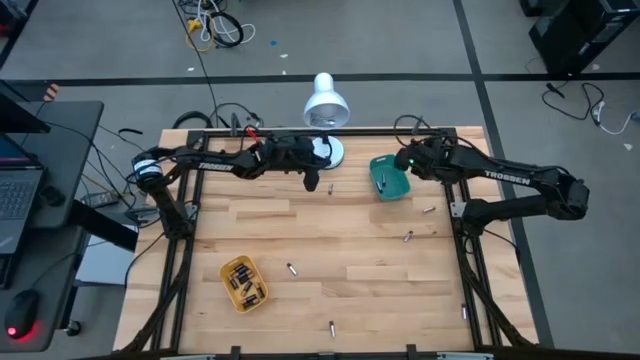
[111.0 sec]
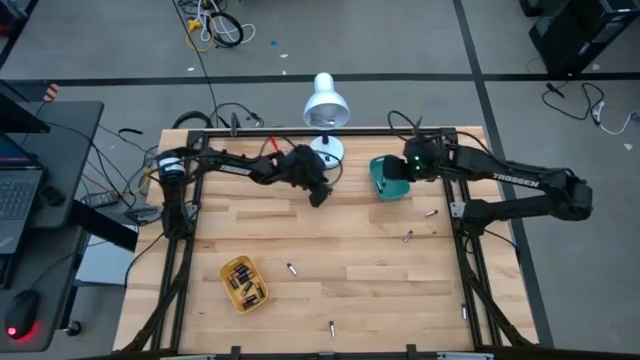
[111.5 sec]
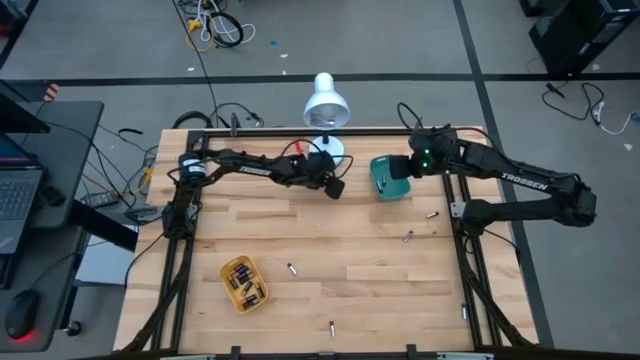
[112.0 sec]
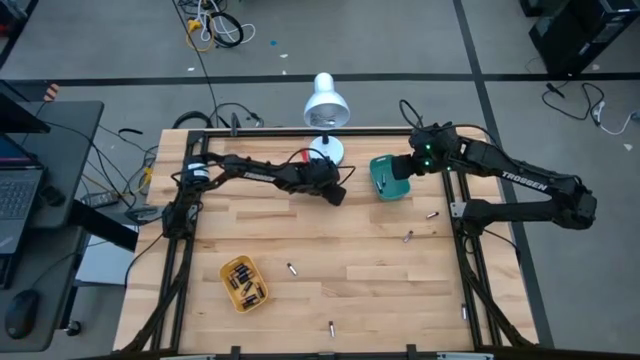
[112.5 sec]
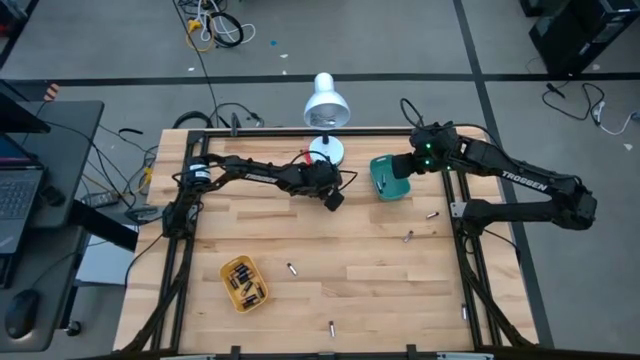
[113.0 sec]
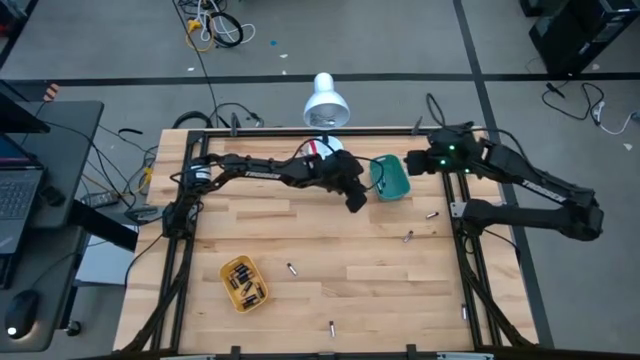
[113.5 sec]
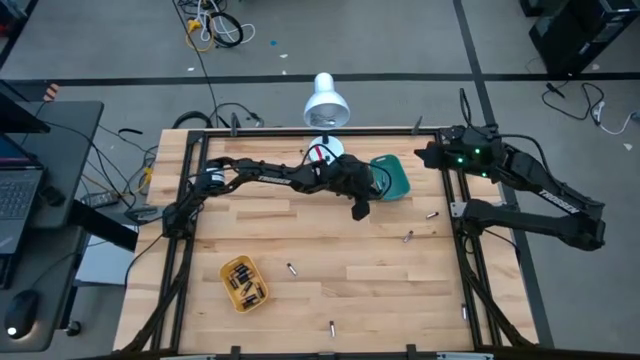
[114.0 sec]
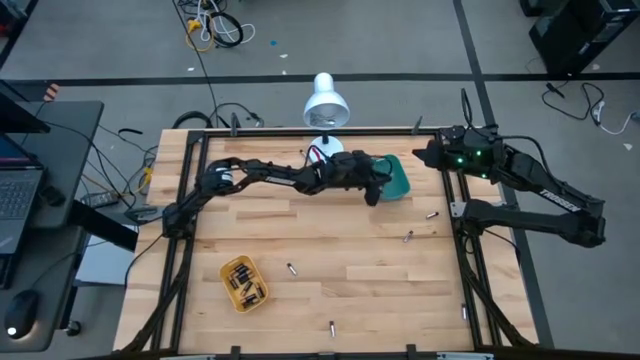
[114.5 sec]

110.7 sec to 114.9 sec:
Task: Sort batteries
Put the silver battery into the green bin

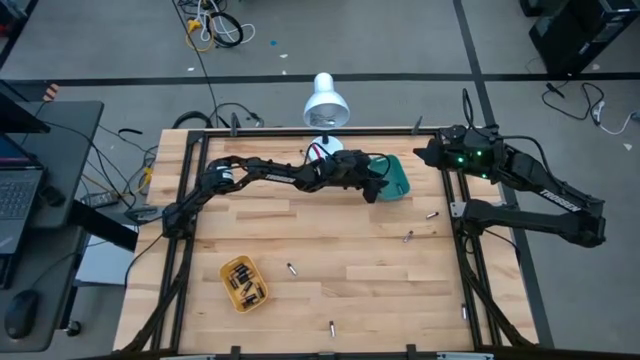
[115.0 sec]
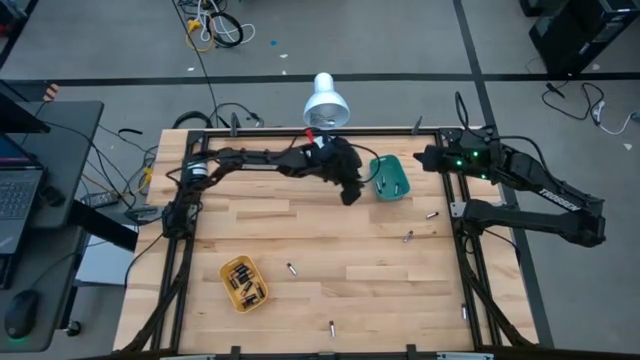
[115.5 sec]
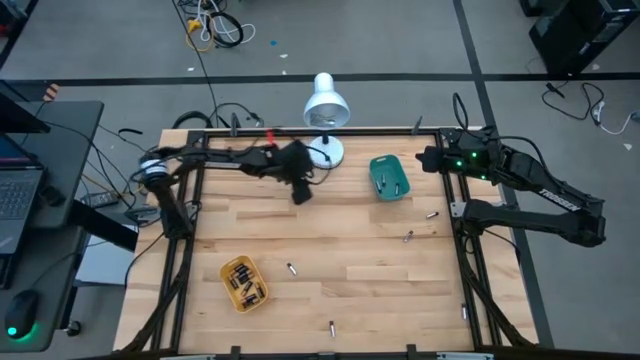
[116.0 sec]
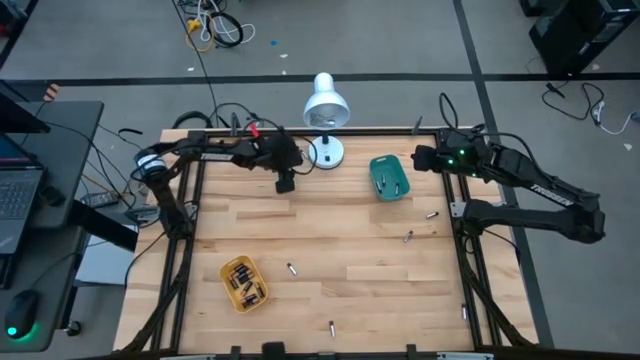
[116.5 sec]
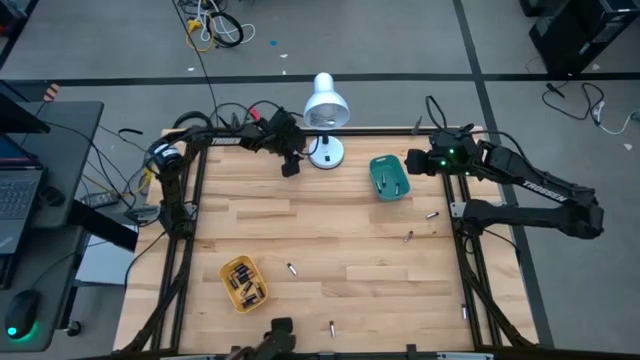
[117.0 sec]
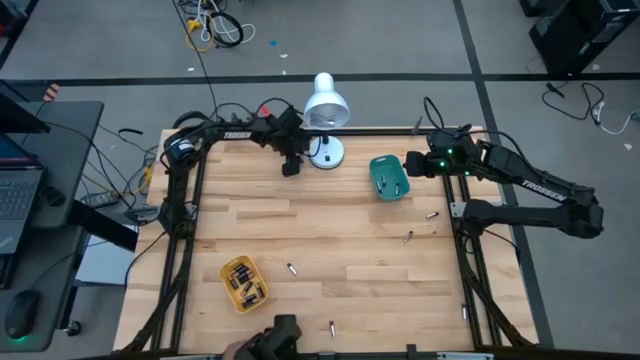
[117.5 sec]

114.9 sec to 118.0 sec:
Put the silver battery into the green bin

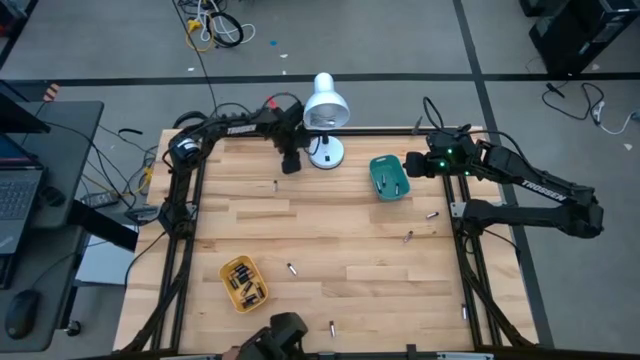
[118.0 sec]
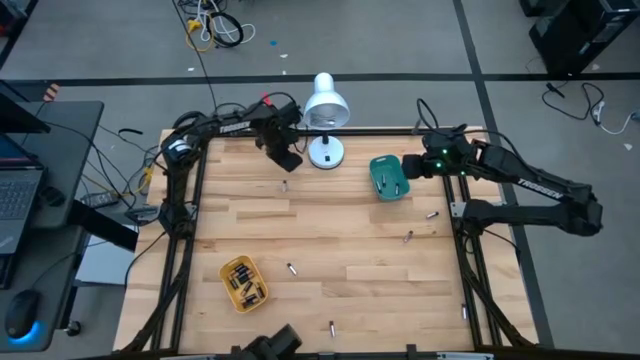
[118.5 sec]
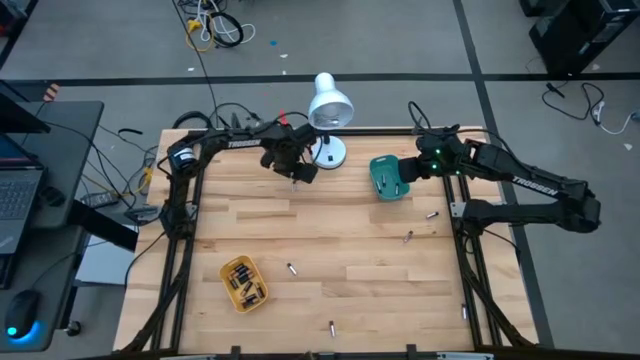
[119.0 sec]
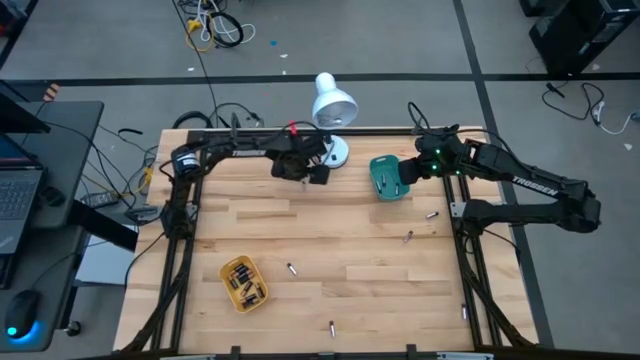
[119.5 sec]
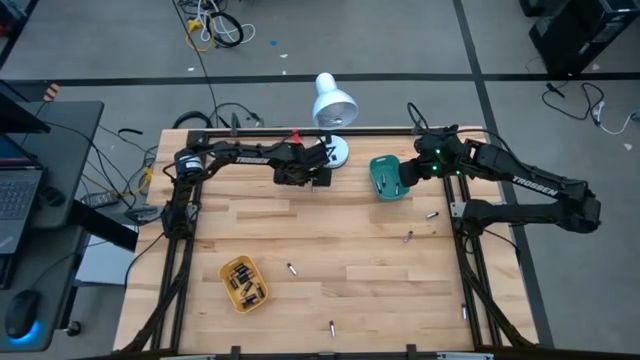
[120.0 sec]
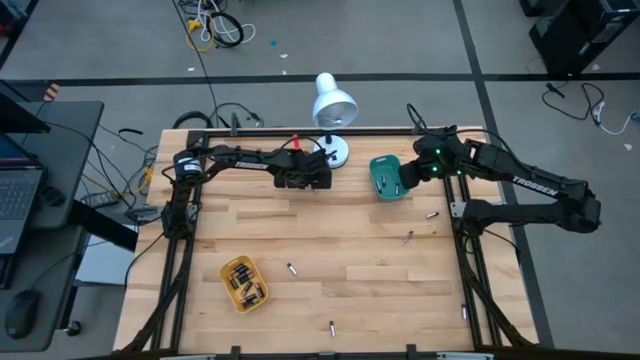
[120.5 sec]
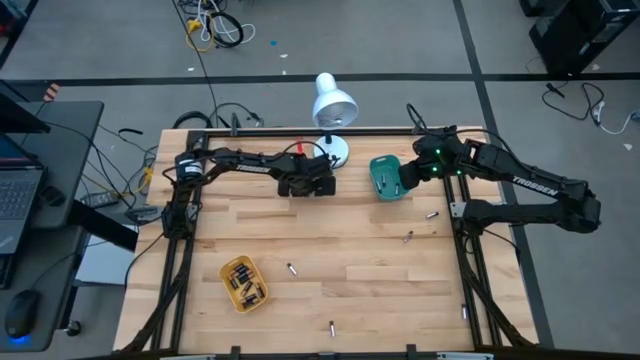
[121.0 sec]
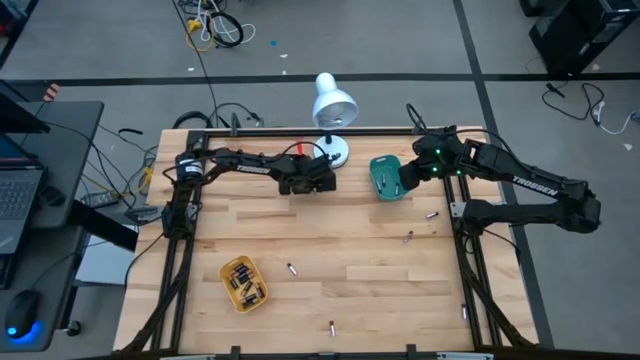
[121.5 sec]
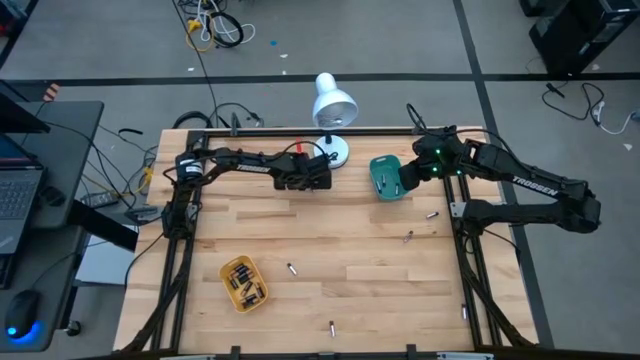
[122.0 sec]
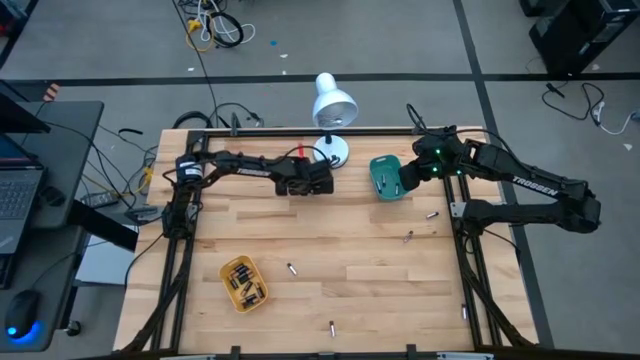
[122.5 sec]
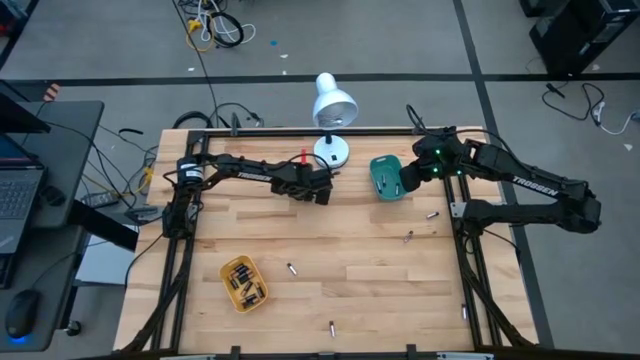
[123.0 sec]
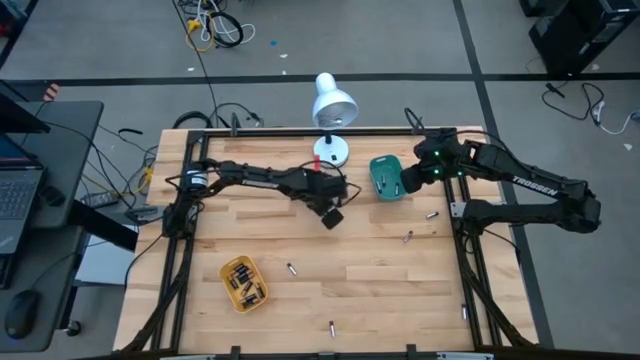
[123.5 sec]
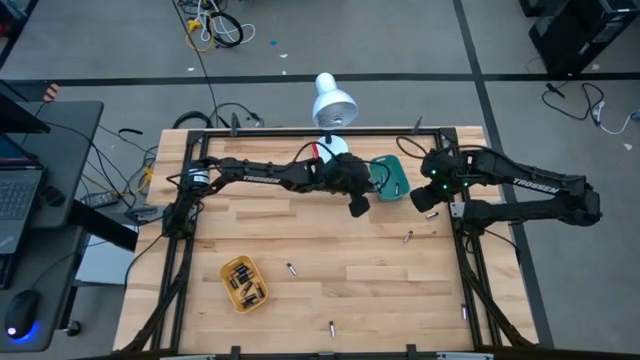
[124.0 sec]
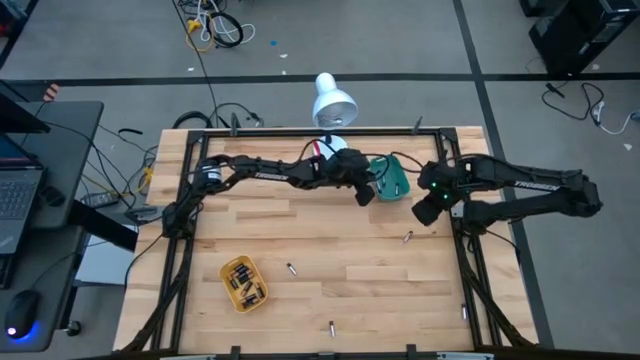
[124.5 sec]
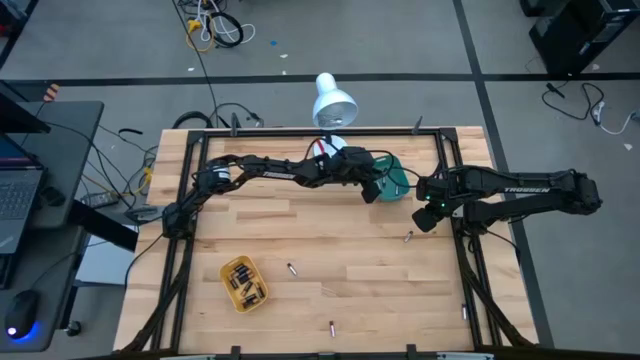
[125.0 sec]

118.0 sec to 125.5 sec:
Put the silver battery into the green bin

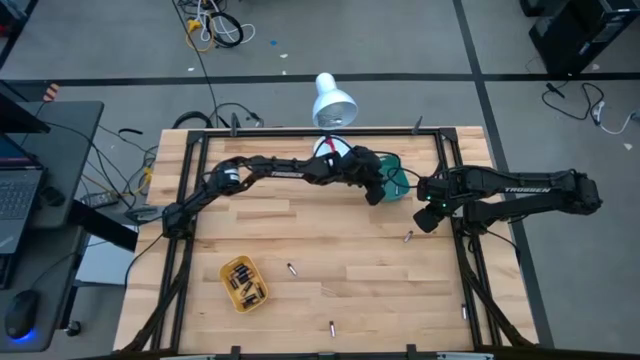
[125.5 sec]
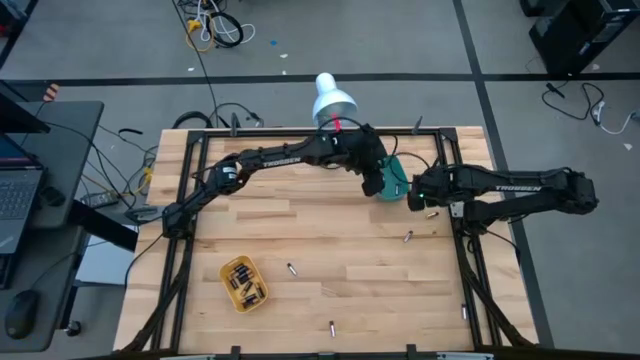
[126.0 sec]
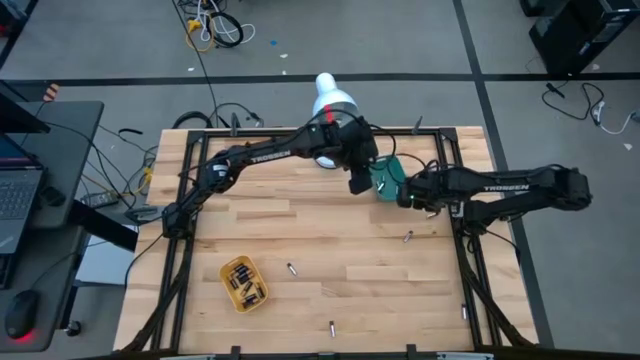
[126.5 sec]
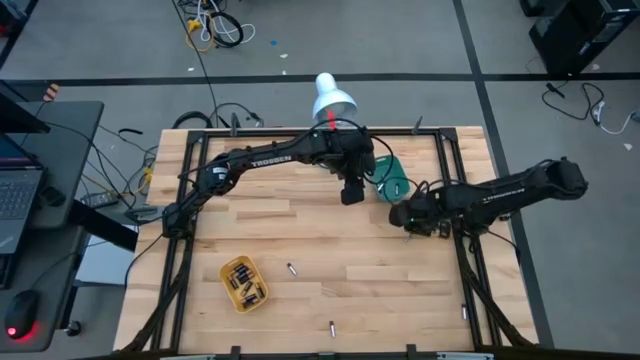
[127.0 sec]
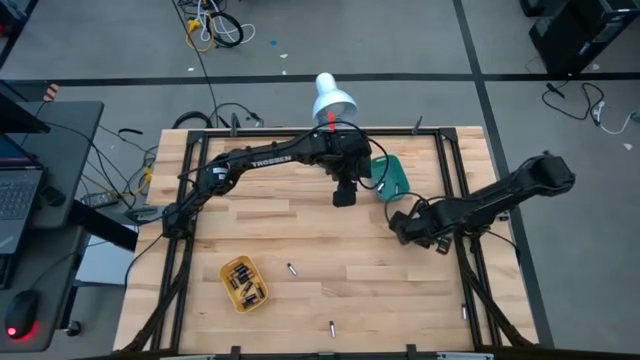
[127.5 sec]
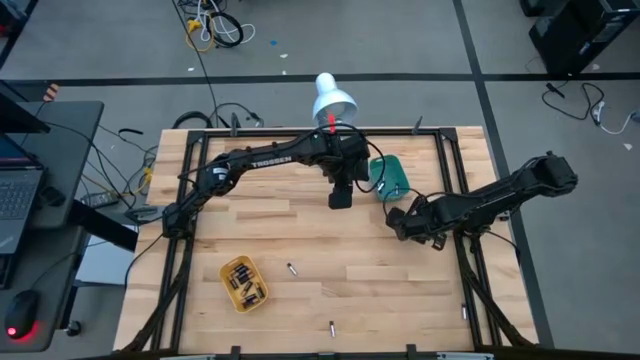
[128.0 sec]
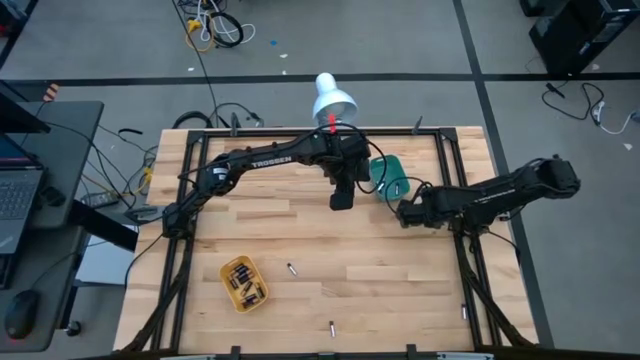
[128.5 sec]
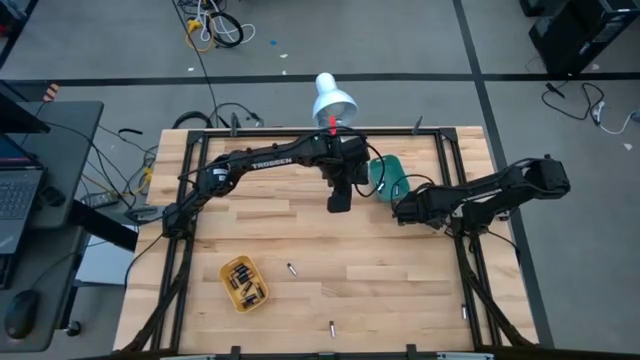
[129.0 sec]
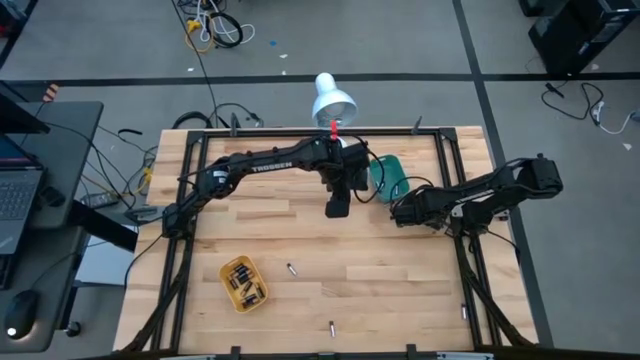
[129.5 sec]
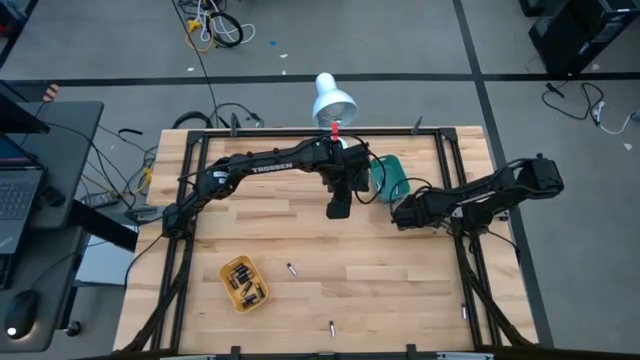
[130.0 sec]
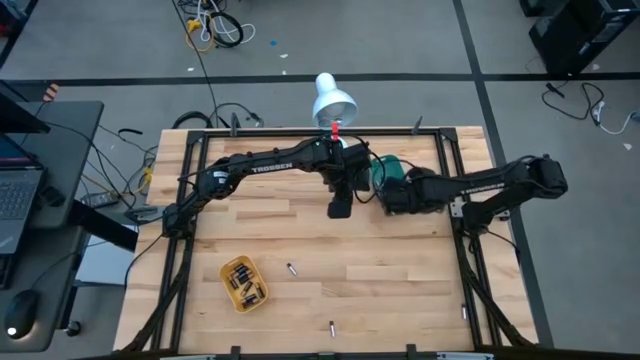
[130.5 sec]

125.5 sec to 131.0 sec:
Put the silver battery into the green bin
